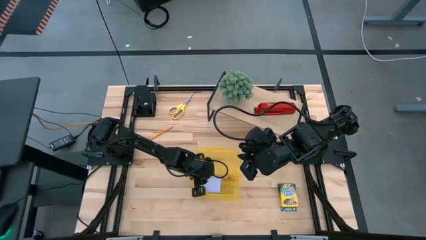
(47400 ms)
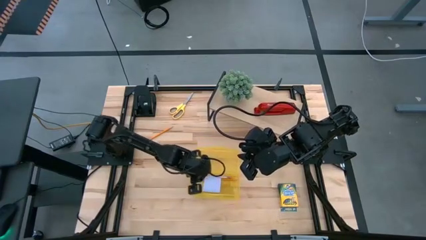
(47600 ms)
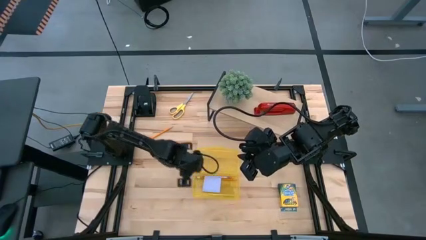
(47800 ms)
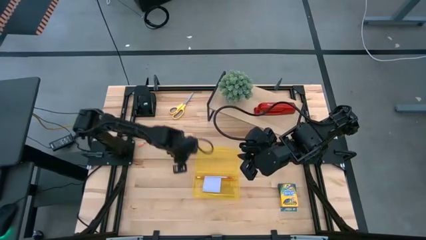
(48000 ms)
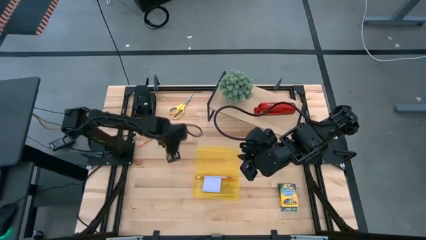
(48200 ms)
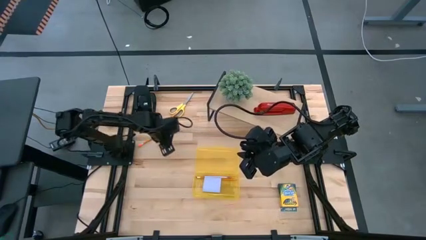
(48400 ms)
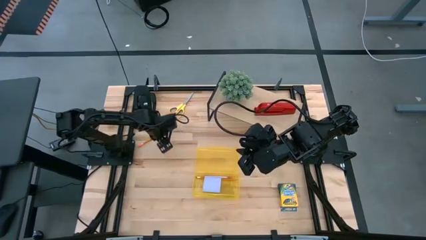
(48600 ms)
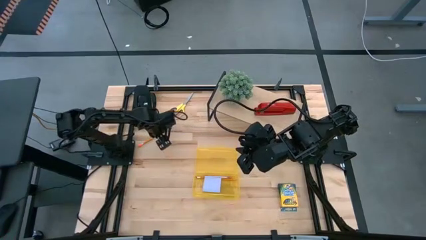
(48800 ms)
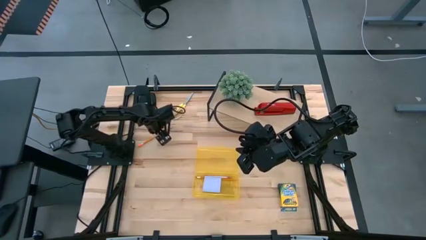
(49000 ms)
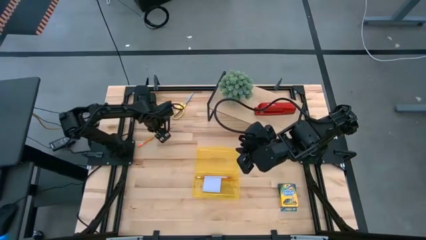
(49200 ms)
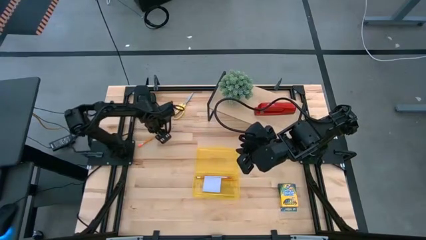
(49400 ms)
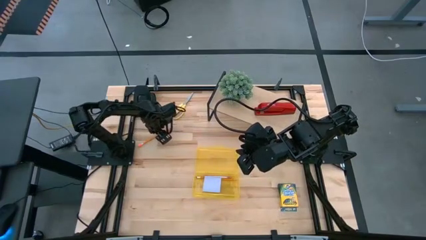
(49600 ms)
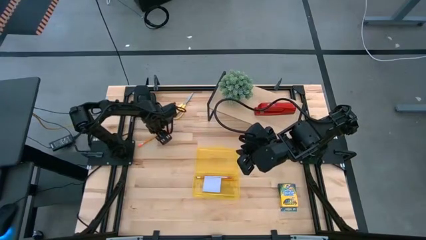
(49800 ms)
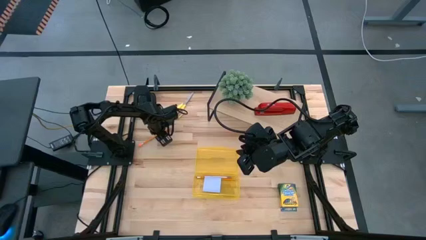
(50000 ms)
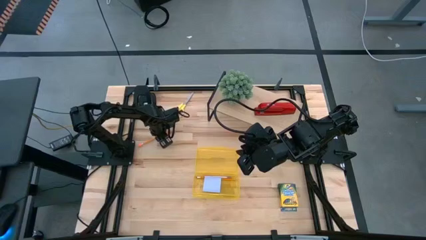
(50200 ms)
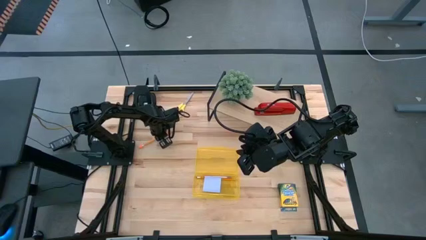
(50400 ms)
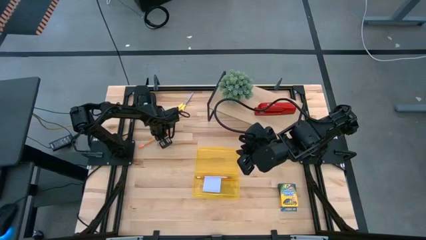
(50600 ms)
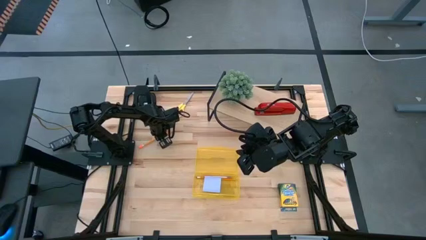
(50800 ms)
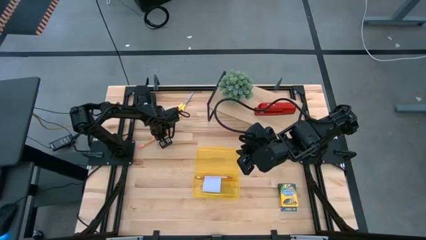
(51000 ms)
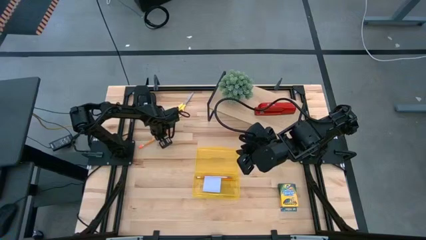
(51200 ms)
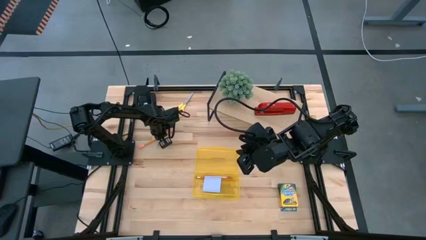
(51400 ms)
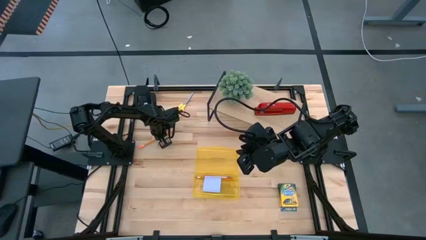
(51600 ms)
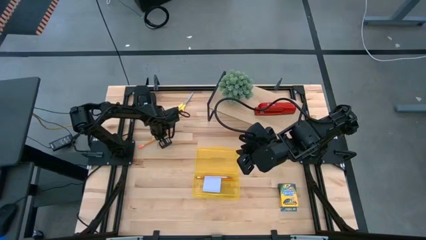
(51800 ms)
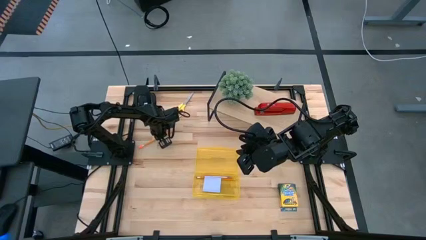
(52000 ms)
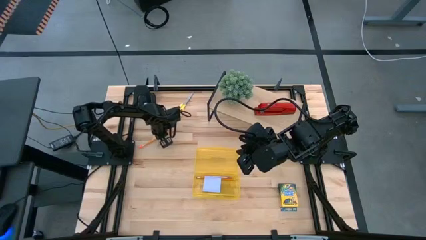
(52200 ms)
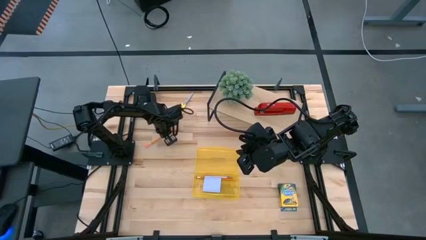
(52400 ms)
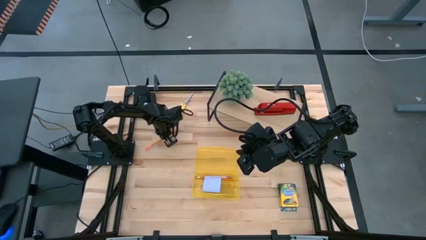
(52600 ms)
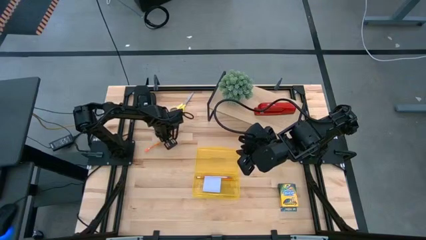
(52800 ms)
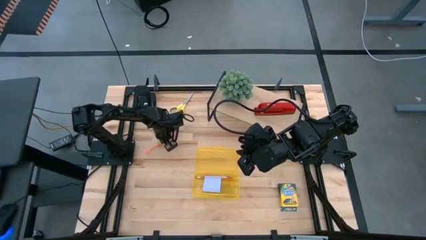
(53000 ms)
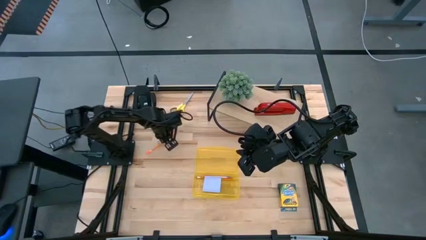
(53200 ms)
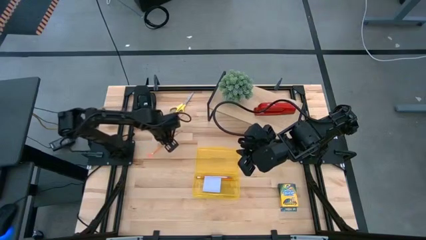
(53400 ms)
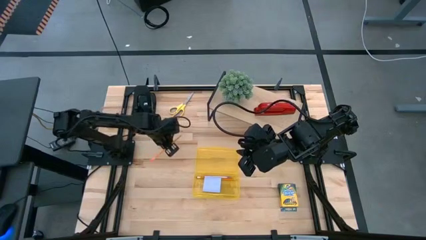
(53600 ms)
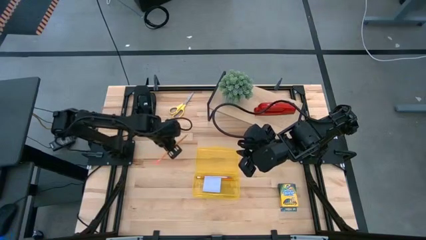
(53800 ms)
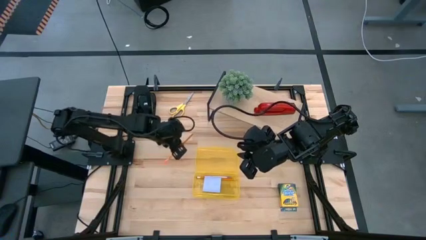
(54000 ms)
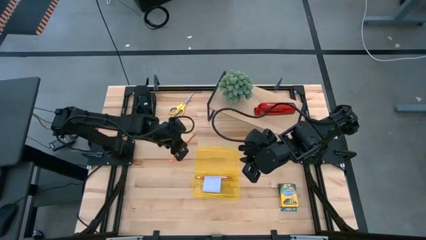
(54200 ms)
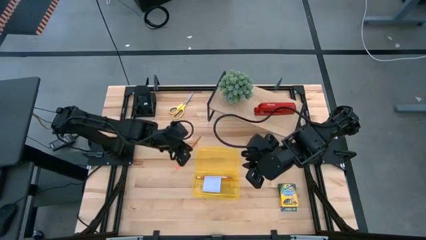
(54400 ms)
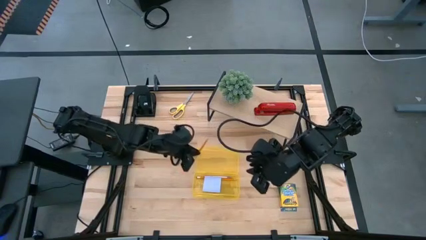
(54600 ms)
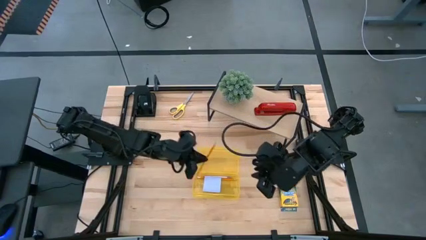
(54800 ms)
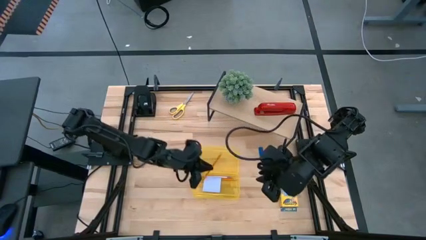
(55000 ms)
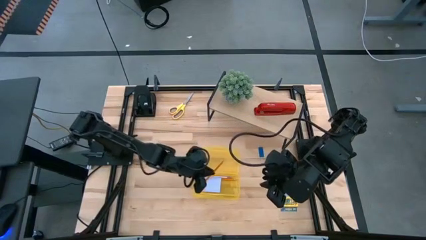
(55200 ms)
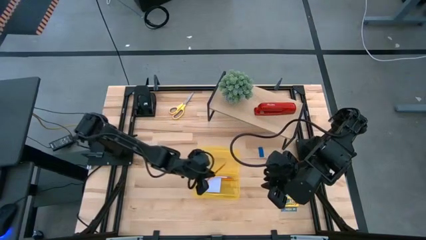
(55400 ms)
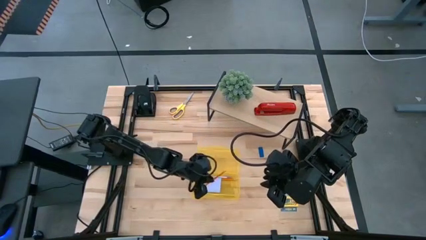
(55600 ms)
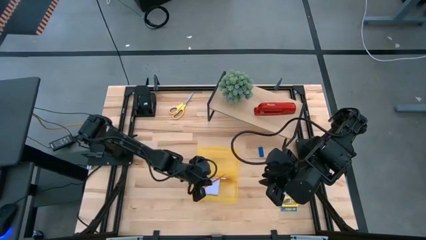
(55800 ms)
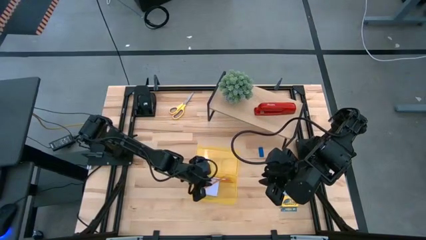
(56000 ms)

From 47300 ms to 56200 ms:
Task: Pack school essentials
Put the pencil into the supply box

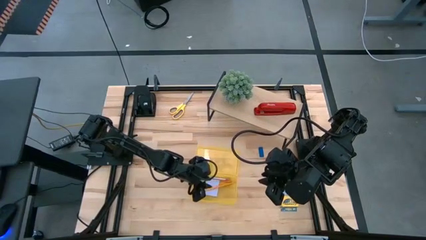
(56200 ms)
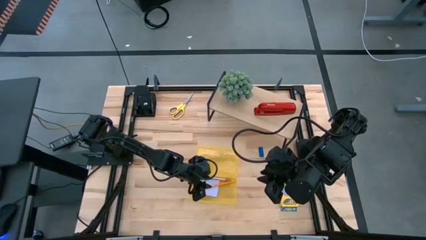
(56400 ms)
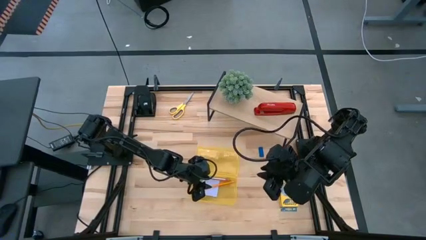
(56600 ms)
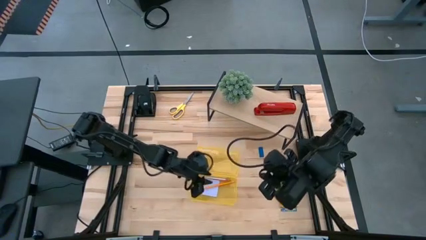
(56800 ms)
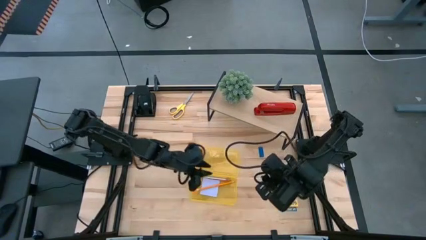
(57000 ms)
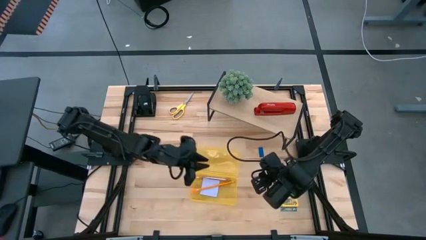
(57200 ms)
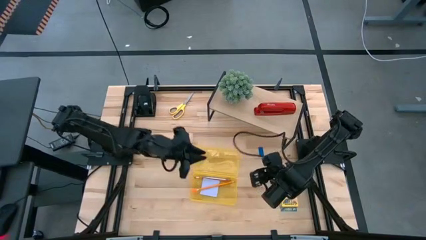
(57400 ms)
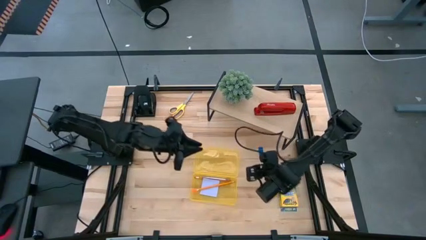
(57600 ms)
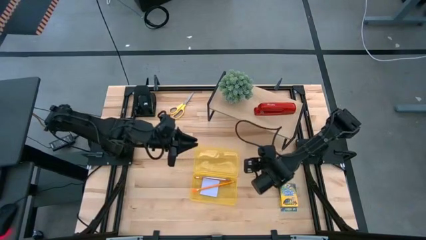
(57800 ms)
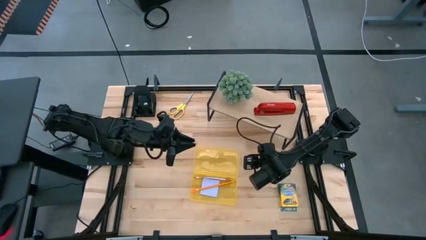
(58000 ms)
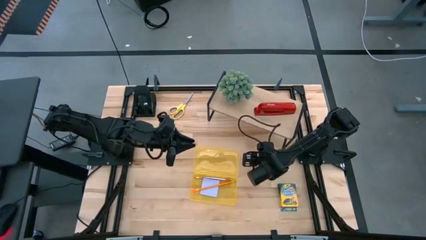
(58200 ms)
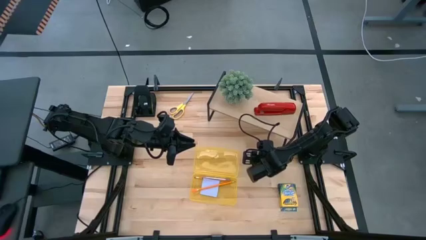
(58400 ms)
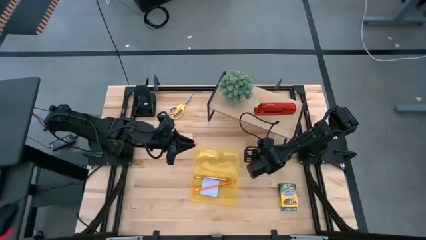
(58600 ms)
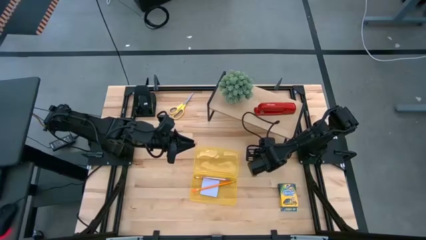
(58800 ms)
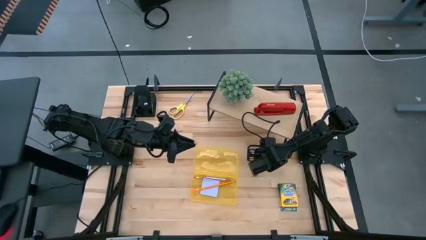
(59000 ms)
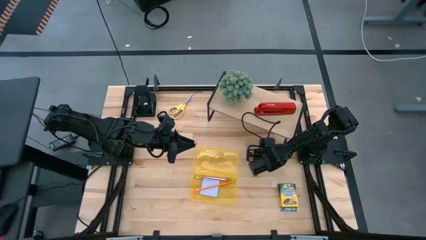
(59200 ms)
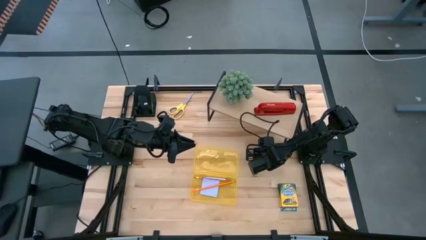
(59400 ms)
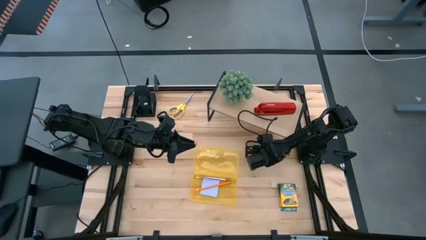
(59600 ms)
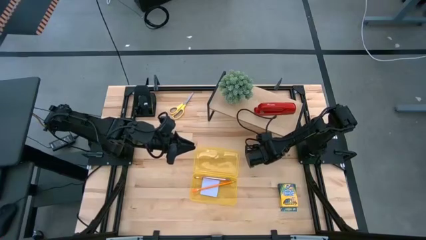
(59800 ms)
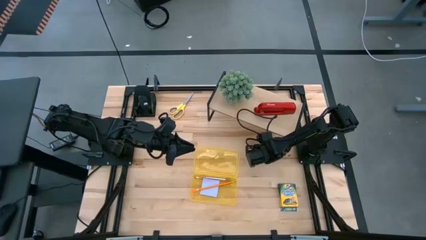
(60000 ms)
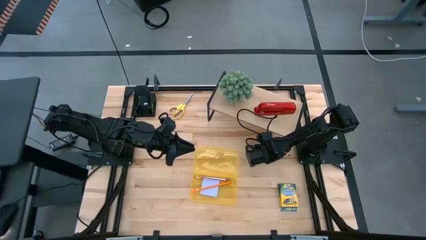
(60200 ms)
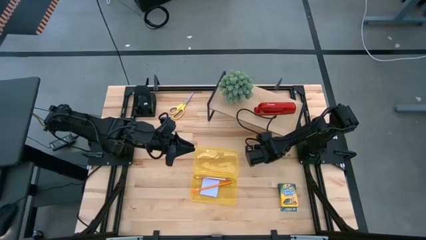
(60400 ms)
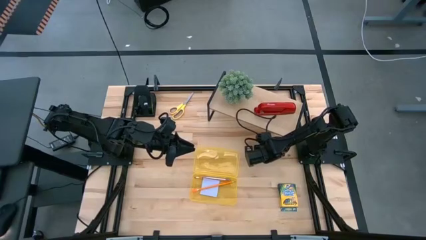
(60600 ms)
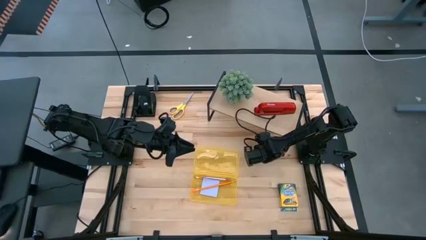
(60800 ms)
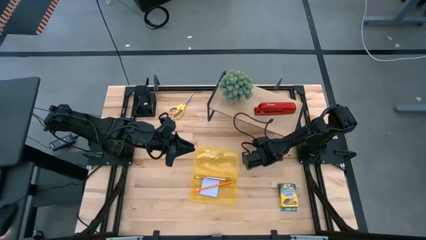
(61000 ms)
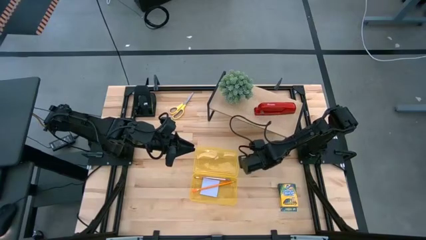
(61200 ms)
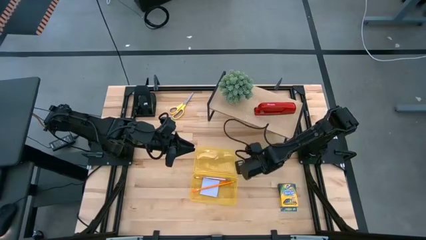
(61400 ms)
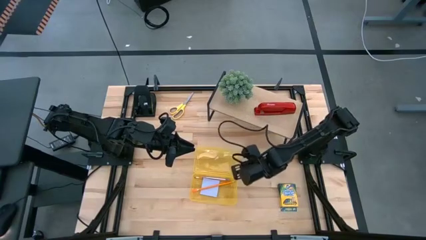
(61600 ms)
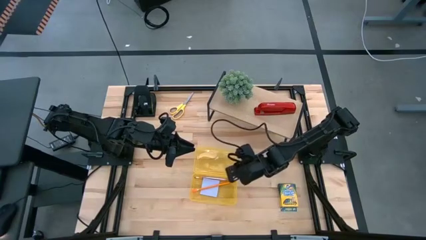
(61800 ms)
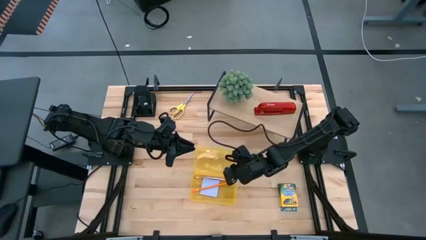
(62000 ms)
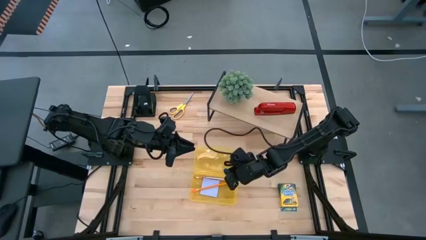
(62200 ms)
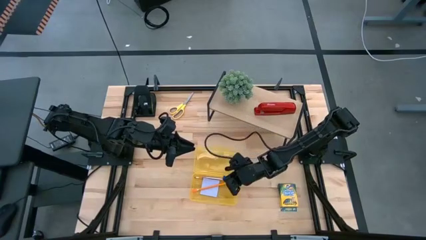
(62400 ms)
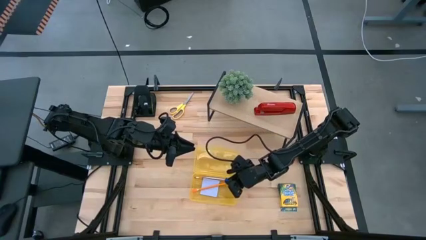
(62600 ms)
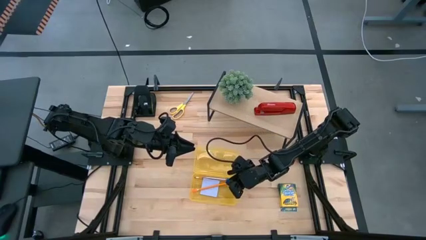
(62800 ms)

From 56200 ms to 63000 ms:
Put the eraser into the supply box
